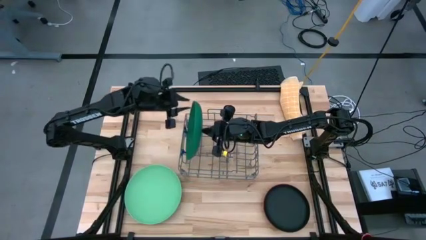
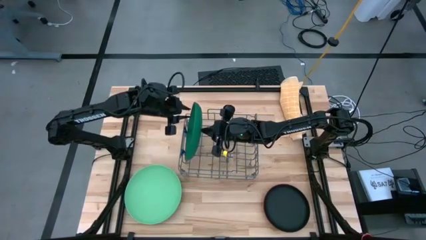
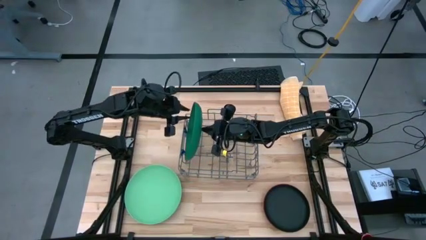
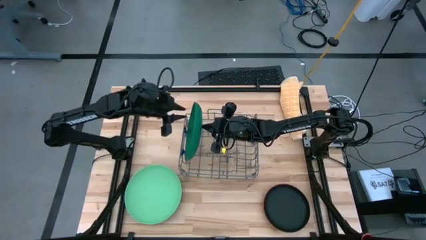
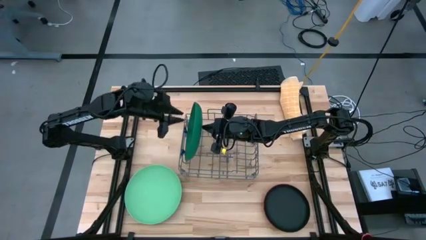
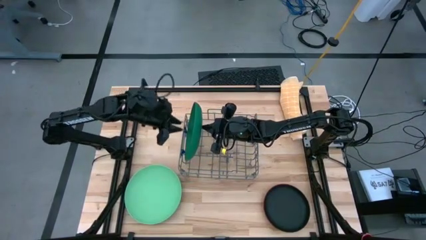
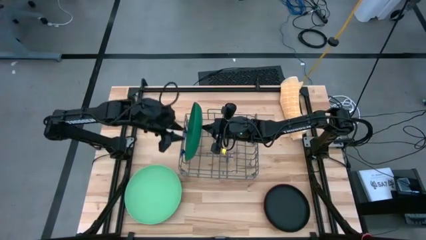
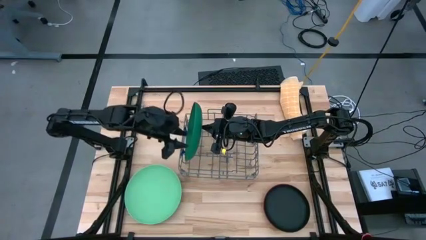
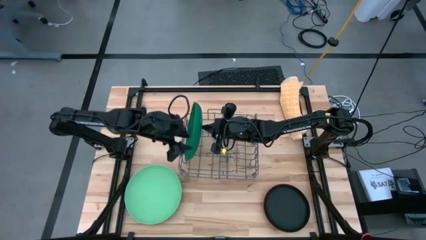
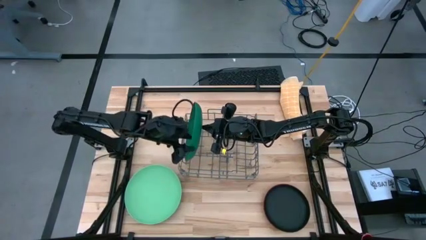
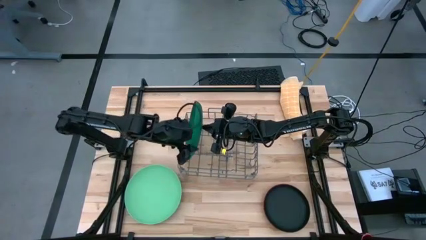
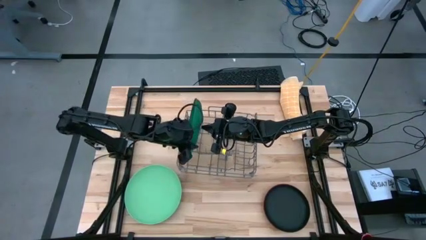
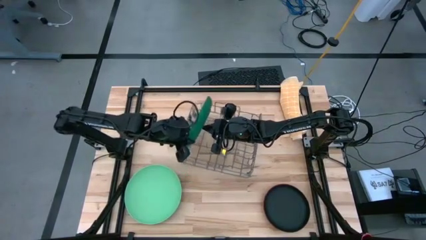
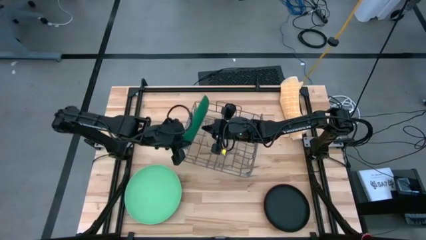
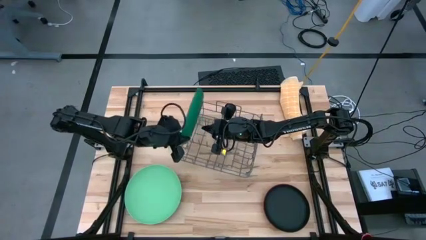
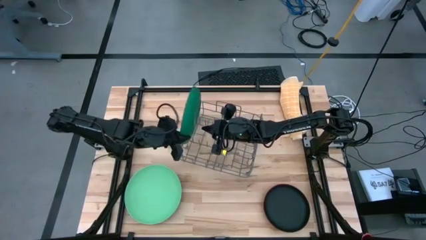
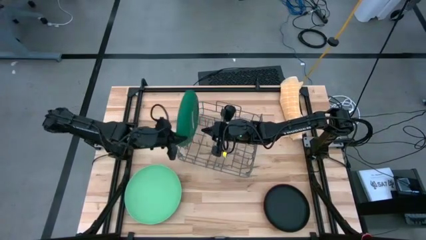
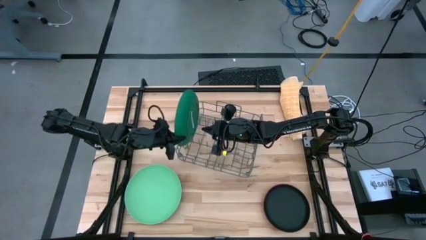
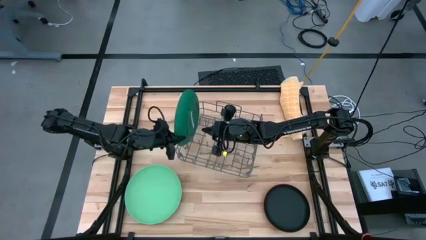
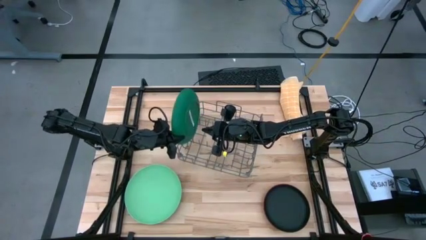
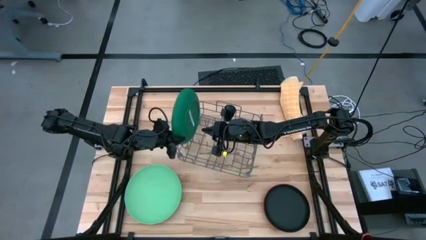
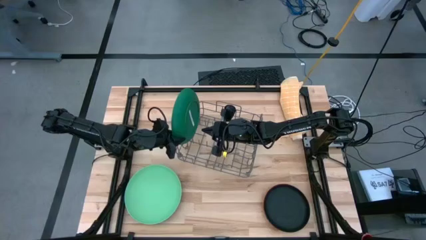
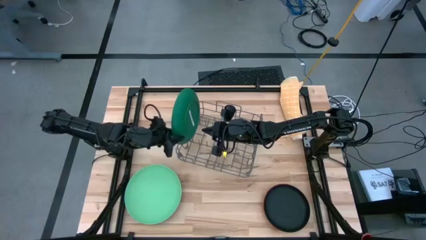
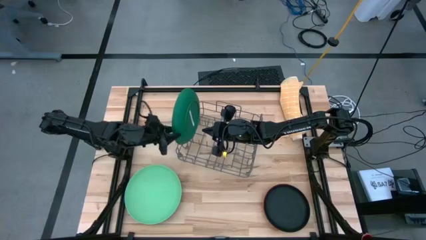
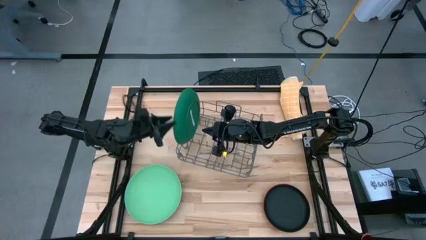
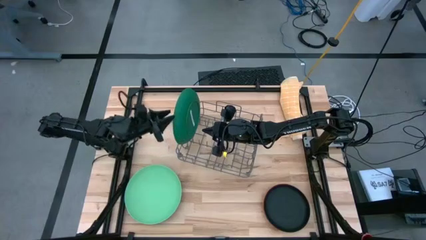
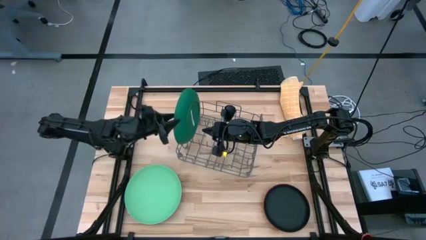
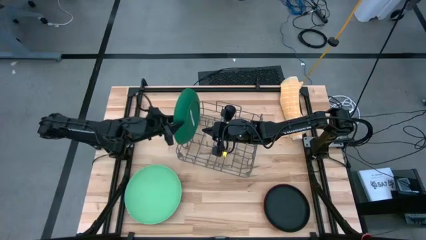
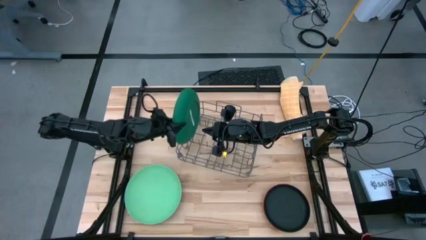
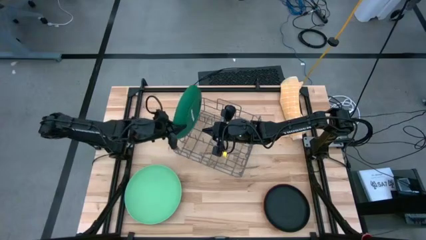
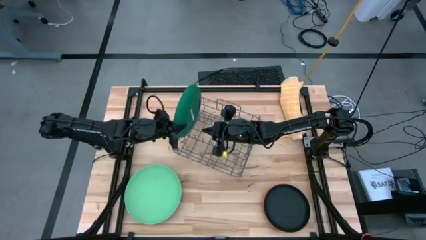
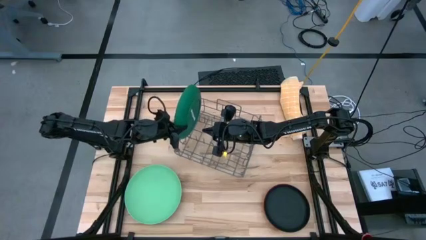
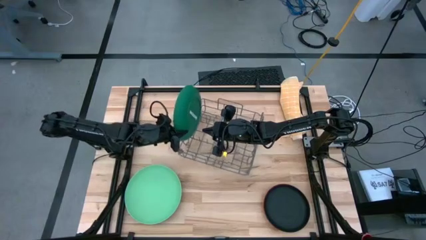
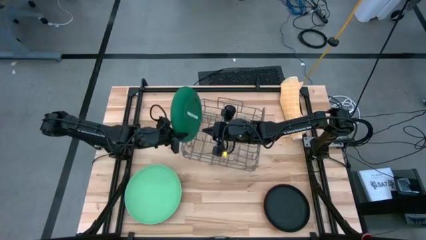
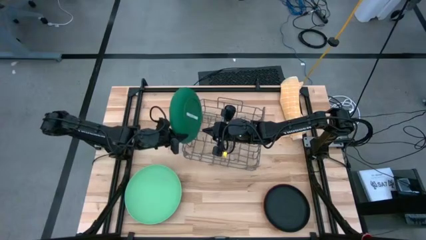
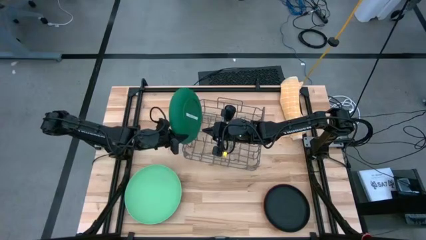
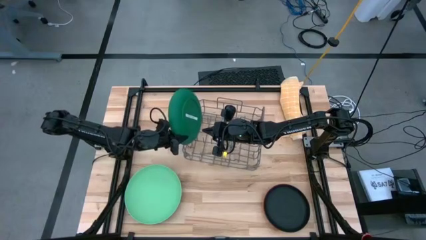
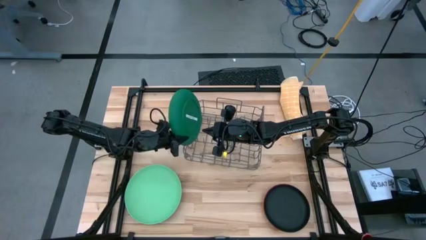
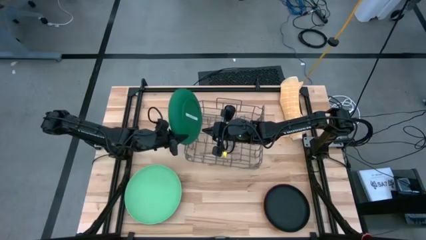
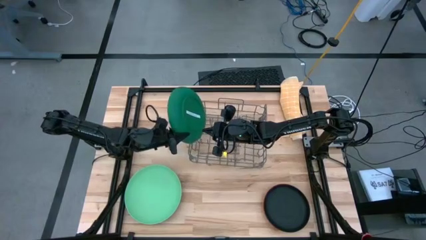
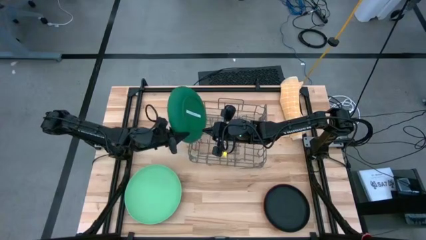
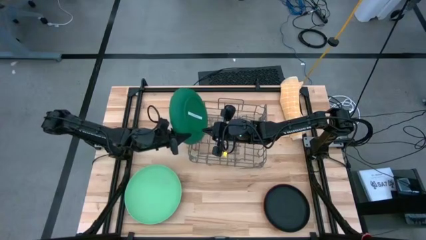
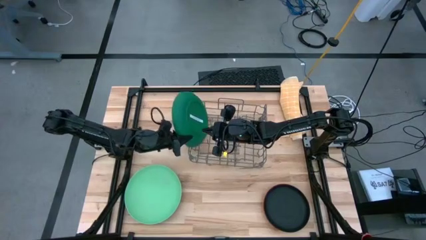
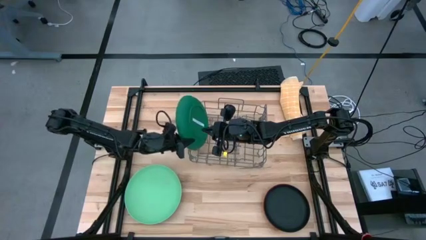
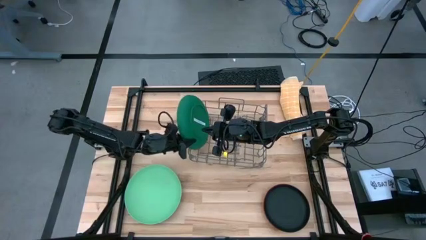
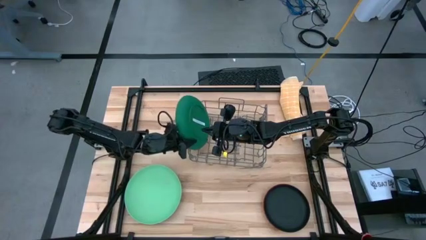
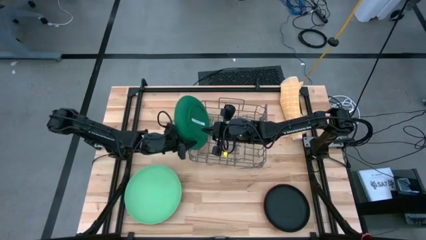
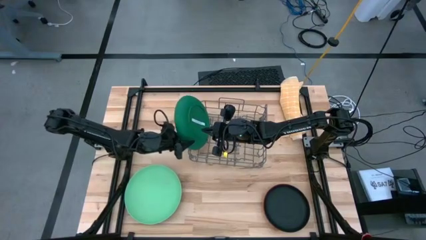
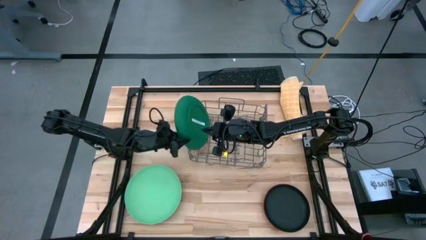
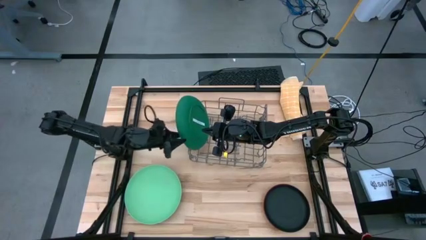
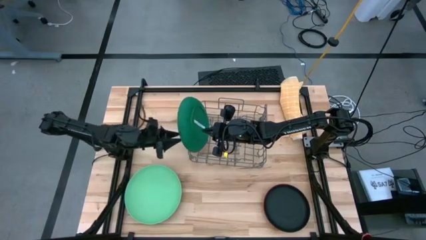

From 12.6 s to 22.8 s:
Task: Sort dishes
Put the green plate into the dish rack
